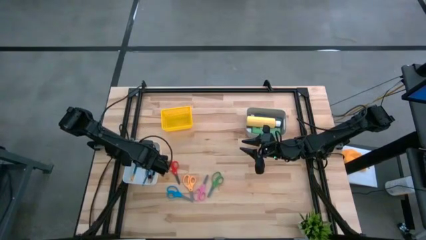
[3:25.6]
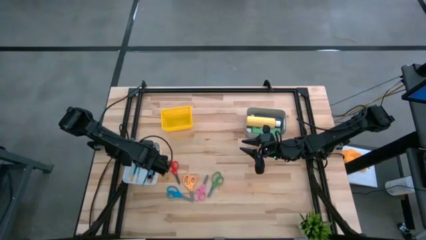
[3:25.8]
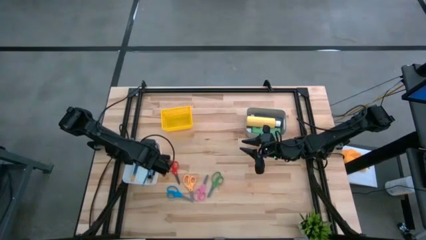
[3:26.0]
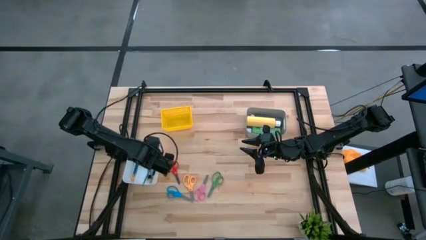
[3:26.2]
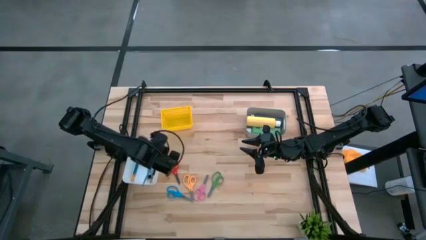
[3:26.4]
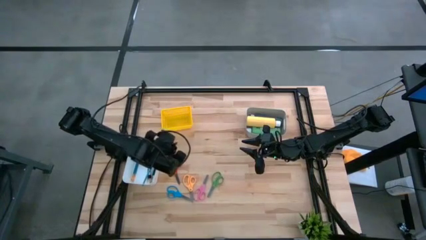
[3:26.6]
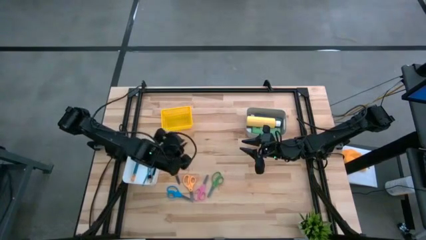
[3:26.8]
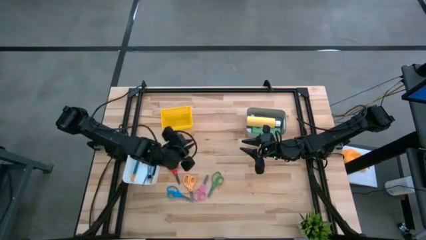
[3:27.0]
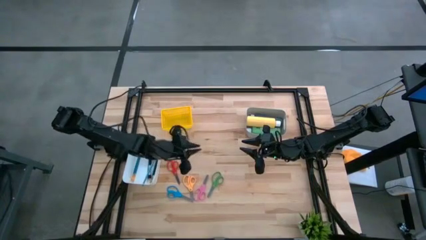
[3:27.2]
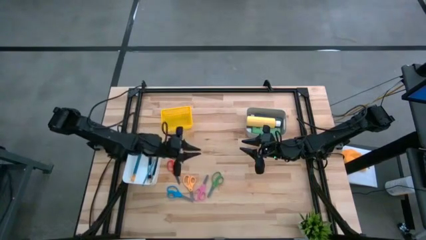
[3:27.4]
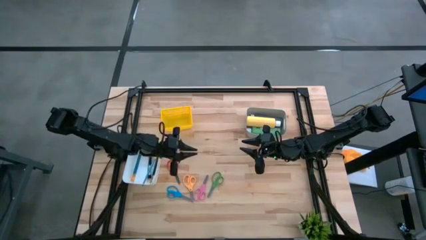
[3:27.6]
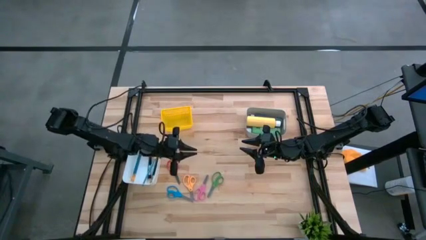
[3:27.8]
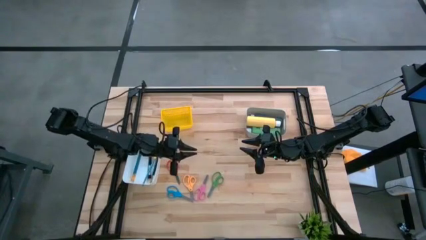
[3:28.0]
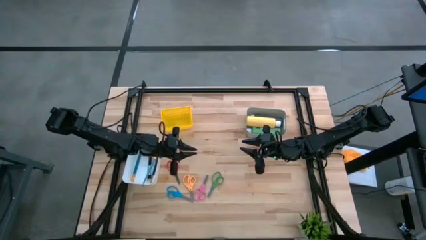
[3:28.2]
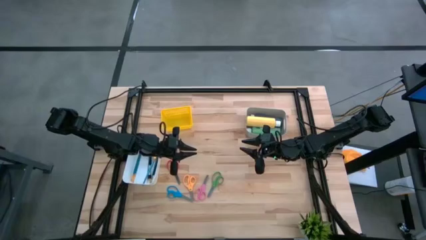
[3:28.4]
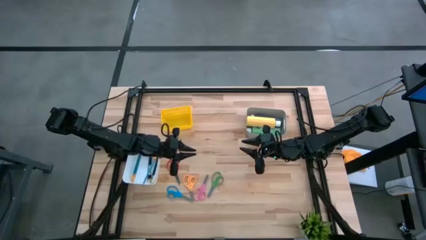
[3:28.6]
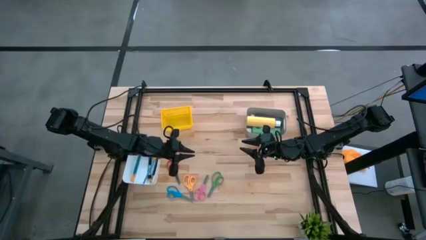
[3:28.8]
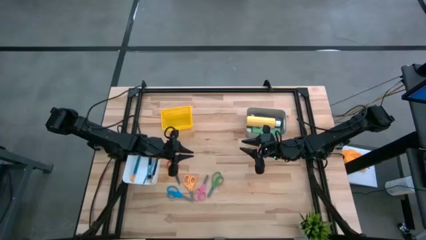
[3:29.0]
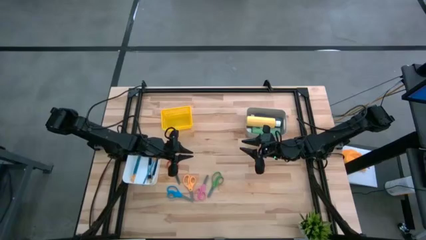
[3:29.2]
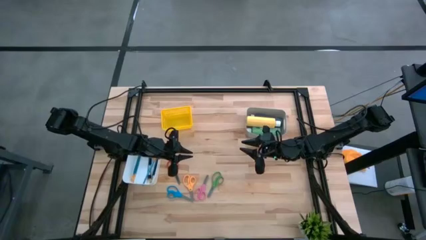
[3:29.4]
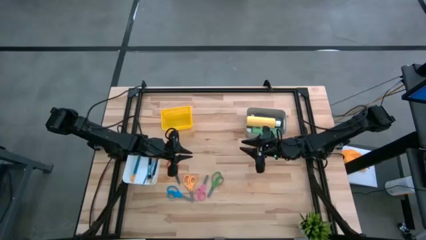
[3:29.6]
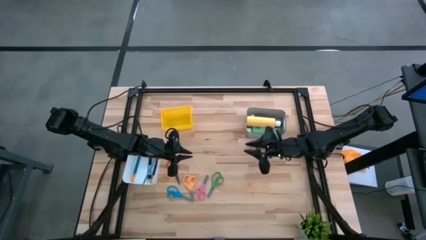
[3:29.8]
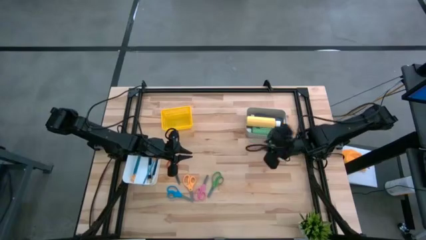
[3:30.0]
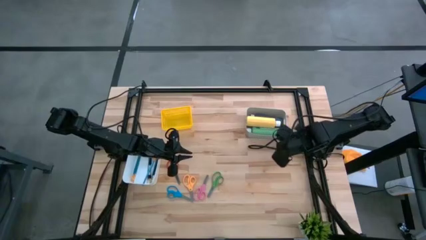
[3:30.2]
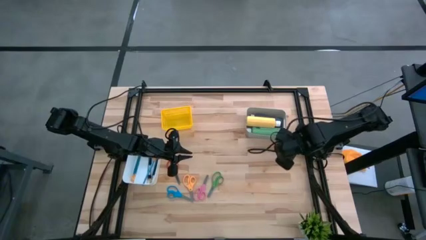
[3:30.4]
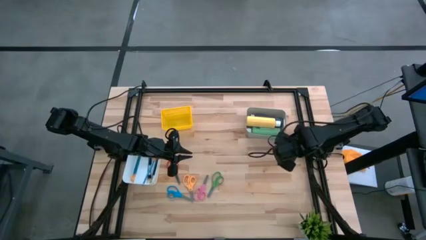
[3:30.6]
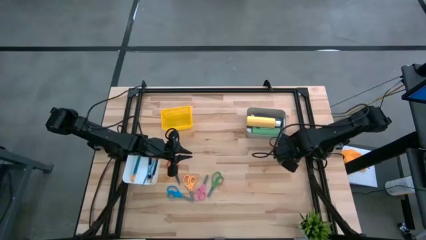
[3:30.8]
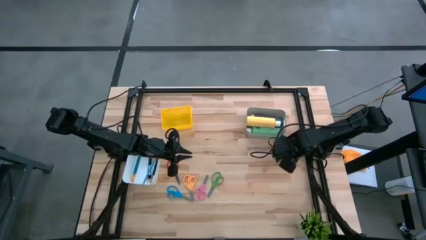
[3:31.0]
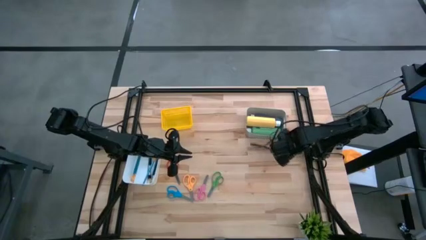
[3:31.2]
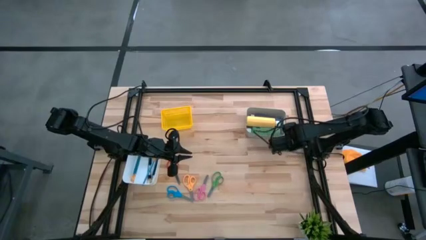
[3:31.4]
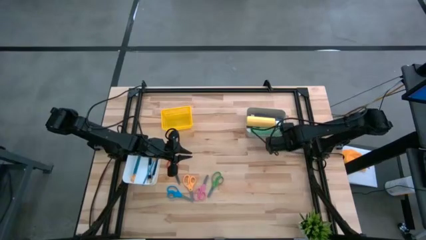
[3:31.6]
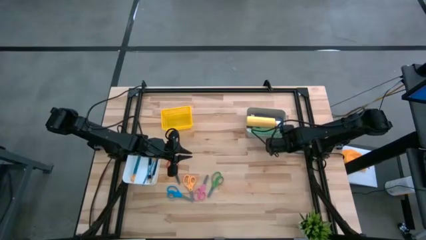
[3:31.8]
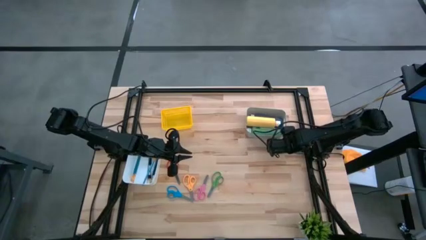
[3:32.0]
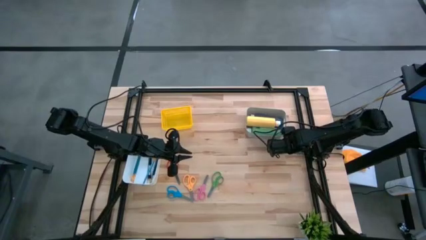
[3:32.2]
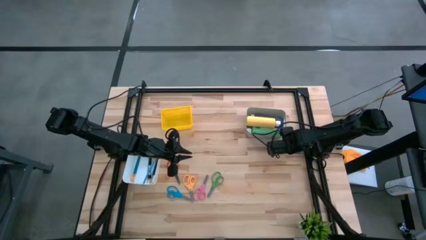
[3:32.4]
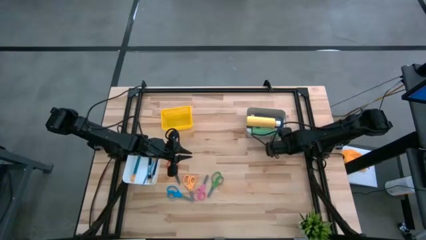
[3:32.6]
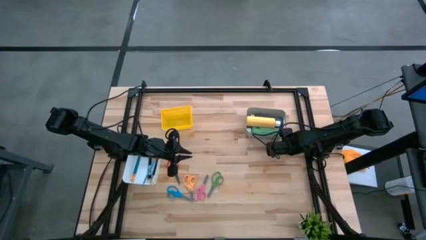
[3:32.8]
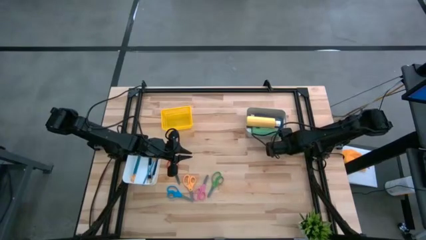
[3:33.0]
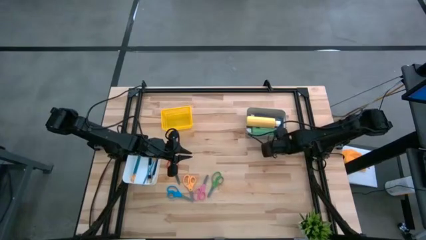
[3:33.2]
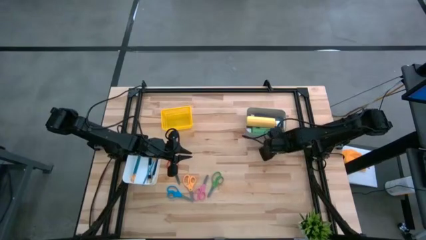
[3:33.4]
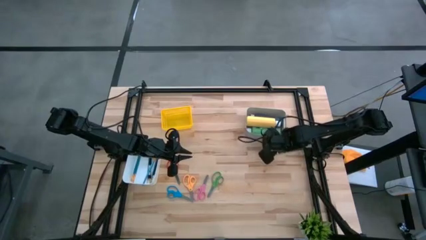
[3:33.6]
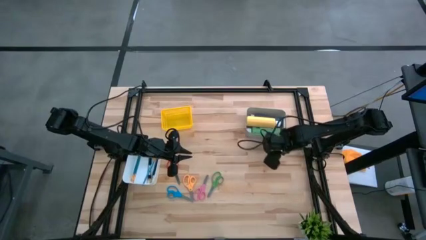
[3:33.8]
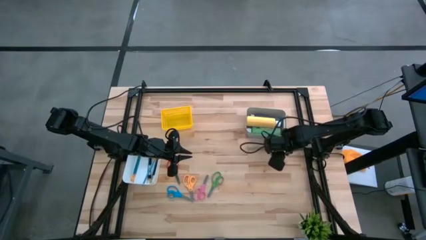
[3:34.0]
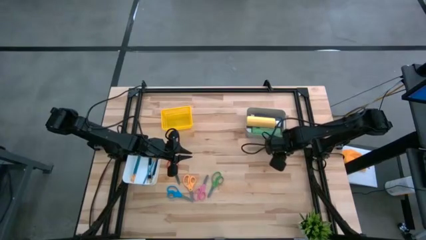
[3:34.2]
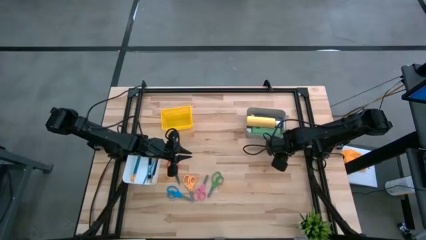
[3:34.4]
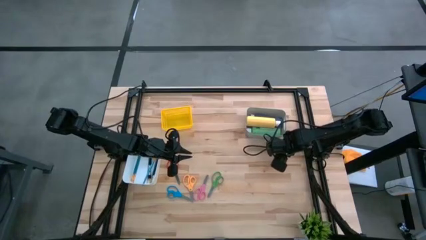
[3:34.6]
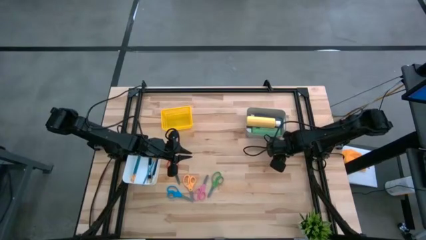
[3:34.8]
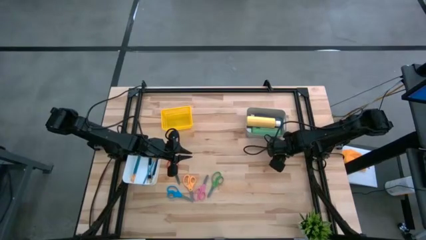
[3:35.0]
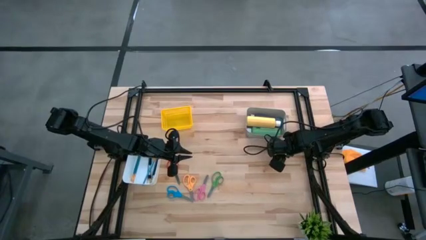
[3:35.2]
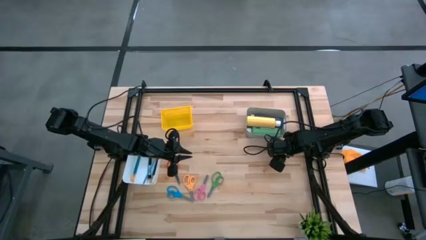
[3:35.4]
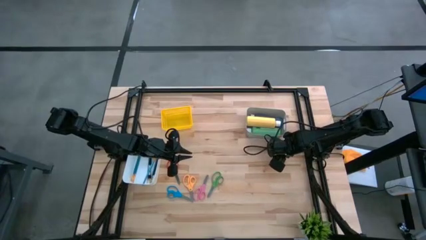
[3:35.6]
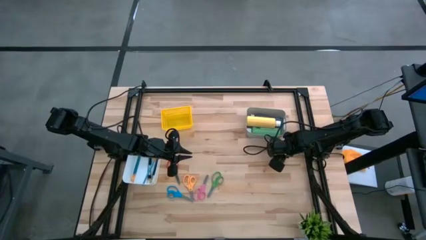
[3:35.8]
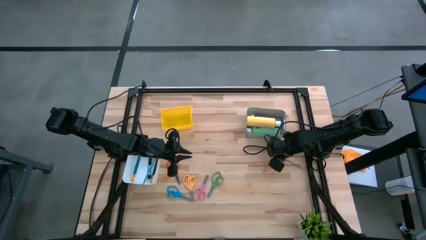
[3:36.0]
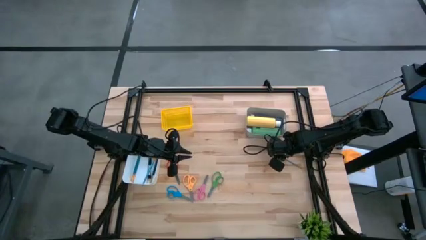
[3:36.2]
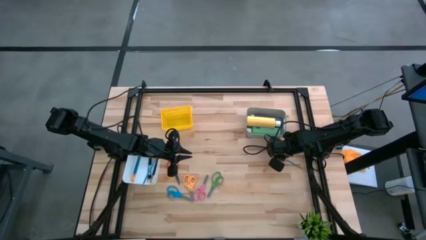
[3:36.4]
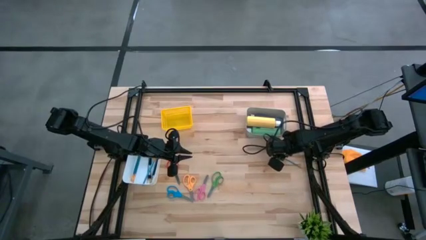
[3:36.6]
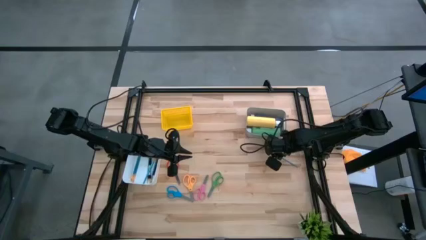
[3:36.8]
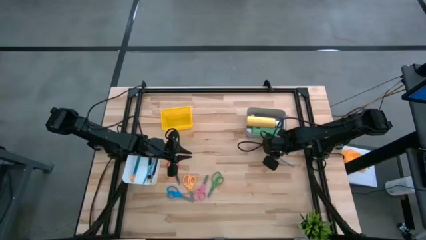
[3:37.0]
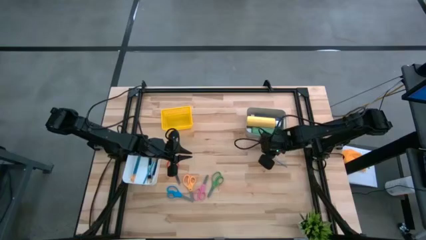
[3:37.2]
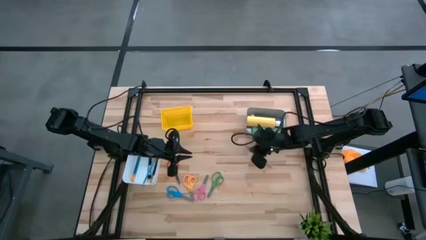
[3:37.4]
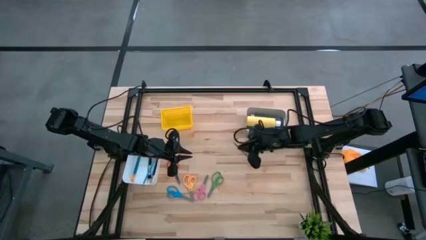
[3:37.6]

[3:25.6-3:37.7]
Task: Pick & Place Paint Supplies
Put the blue paintbrush into the white bin

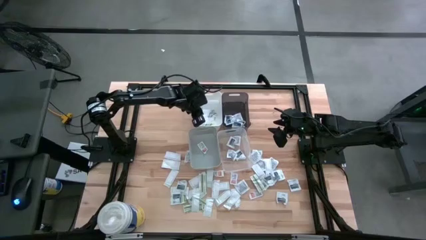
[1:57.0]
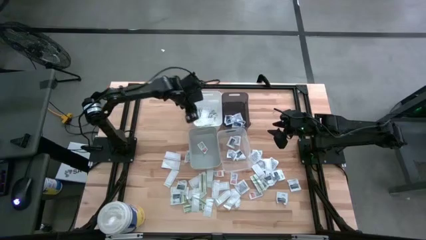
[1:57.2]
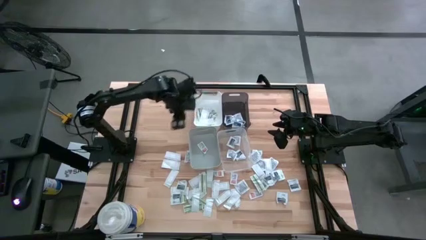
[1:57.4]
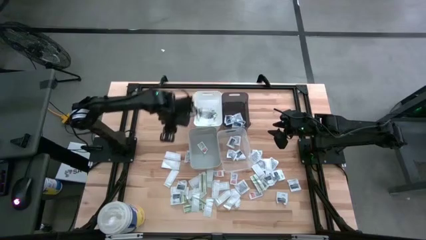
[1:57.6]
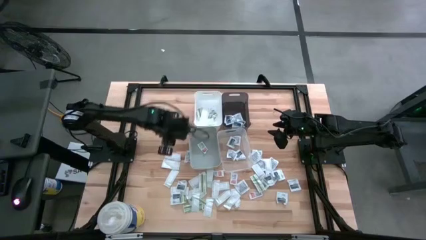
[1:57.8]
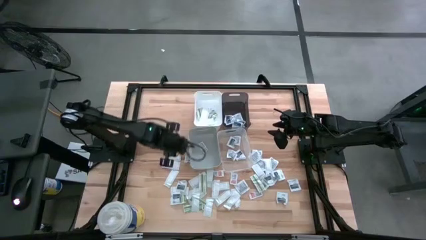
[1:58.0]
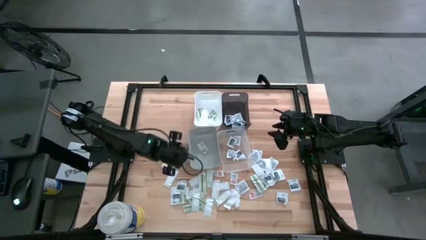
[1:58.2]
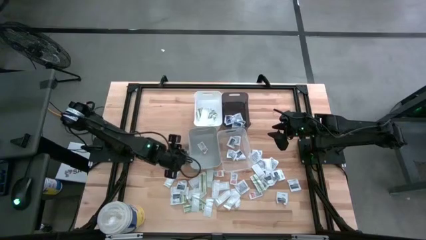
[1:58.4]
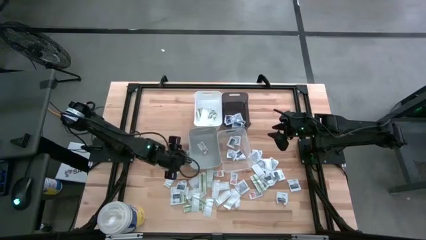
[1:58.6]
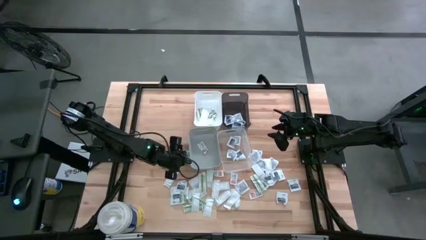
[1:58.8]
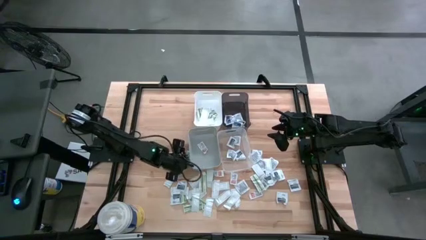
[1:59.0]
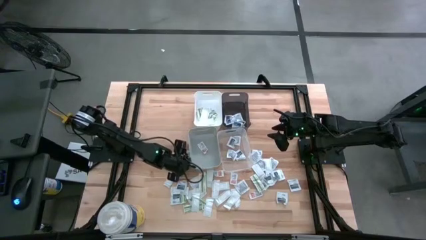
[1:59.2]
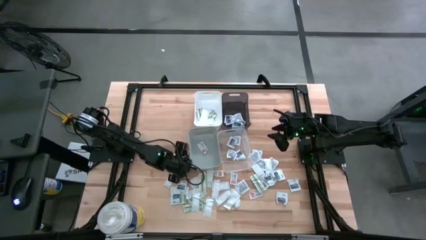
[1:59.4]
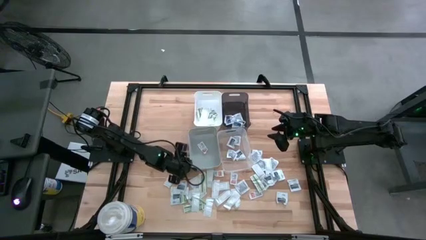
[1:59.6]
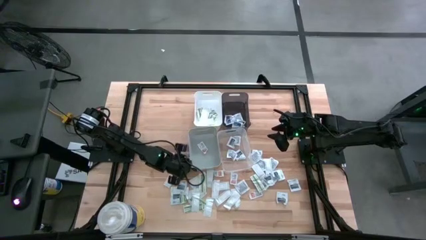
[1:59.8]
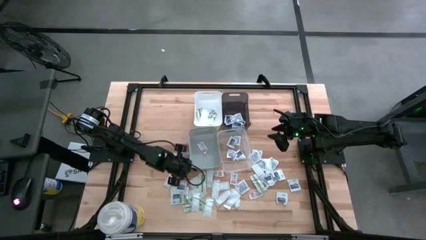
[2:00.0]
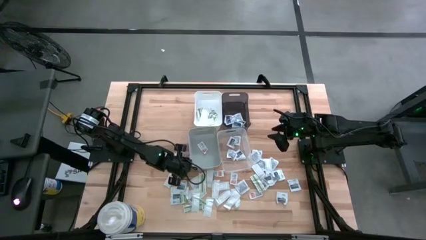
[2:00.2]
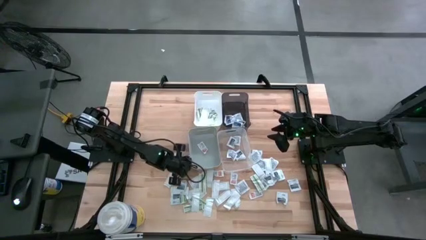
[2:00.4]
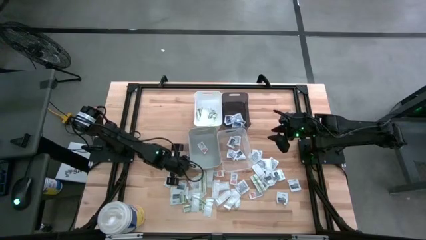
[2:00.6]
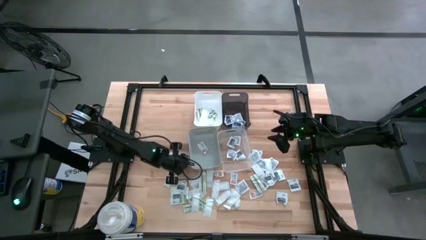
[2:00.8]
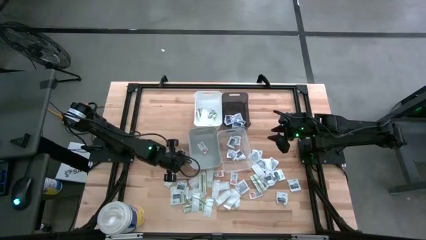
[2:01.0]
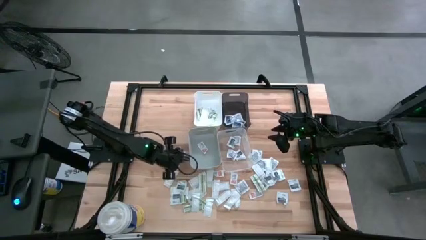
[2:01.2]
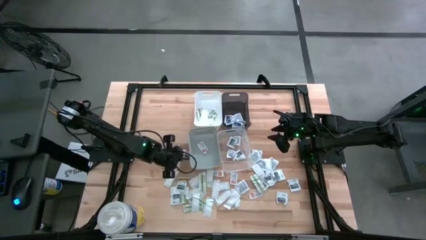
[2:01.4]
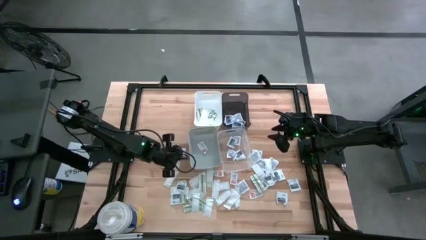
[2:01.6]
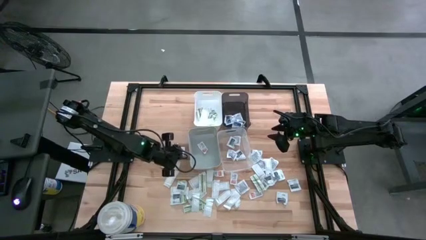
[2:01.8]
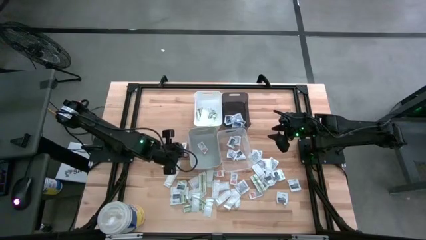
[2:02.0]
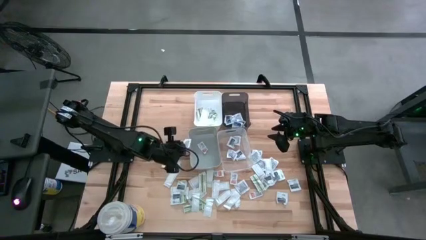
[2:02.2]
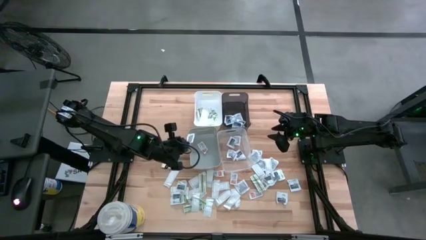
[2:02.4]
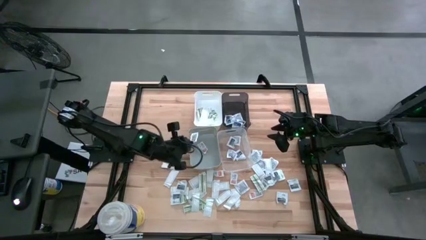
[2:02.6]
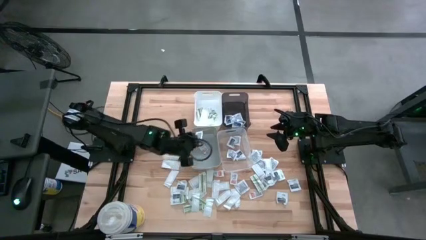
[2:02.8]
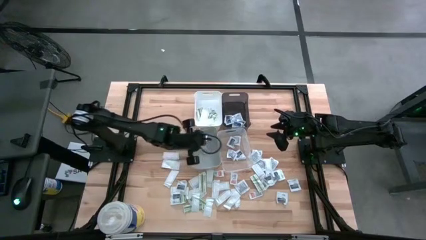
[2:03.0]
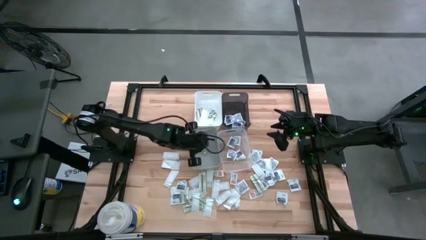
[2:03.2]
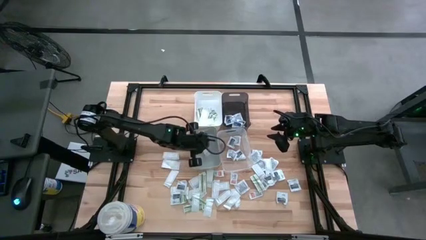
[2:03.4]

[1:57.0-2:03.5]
Task: Pick & Place First Aid Supplies
Put the orange ointment pack into the gray bin
